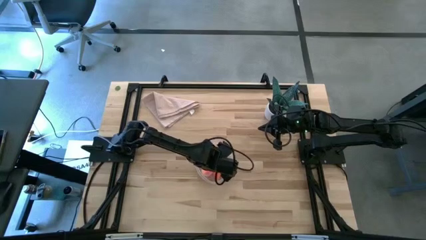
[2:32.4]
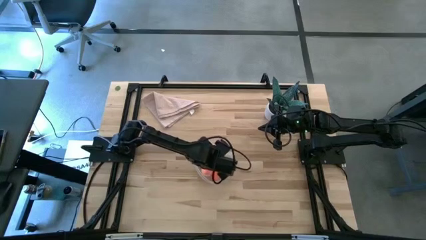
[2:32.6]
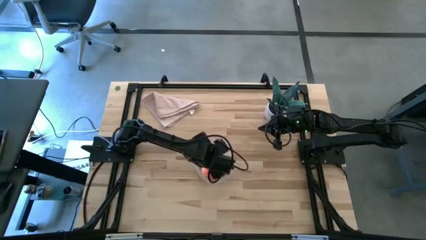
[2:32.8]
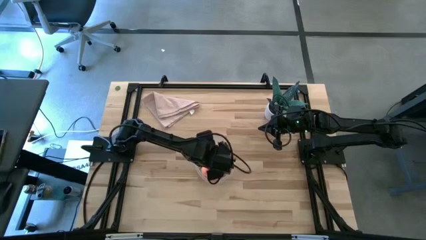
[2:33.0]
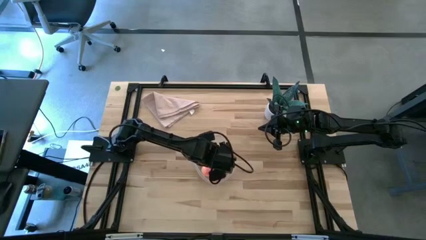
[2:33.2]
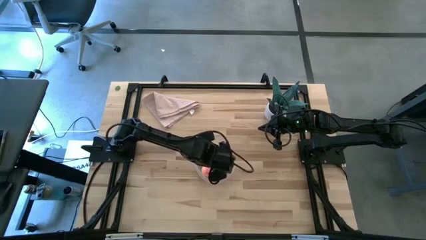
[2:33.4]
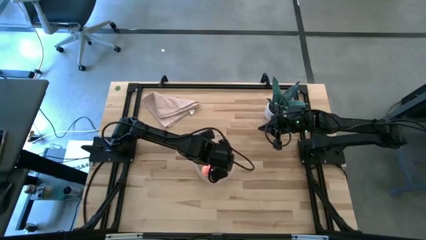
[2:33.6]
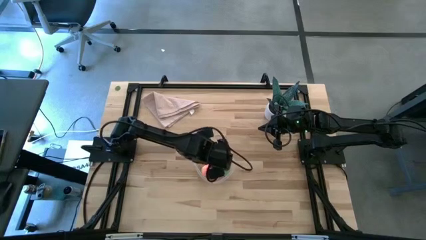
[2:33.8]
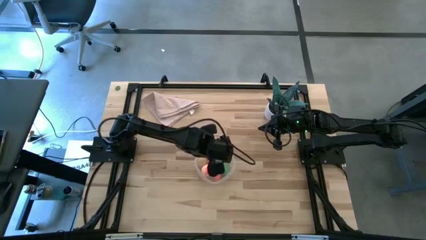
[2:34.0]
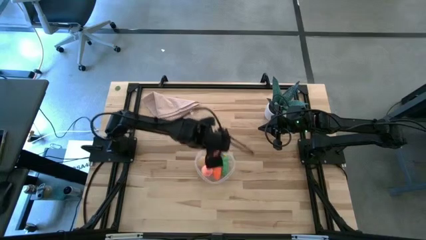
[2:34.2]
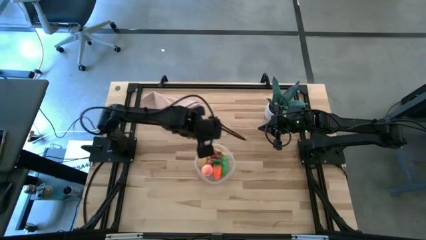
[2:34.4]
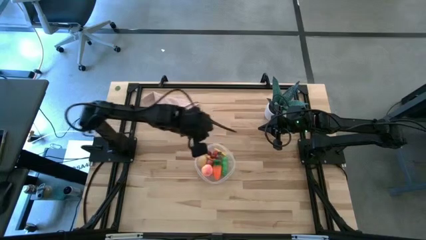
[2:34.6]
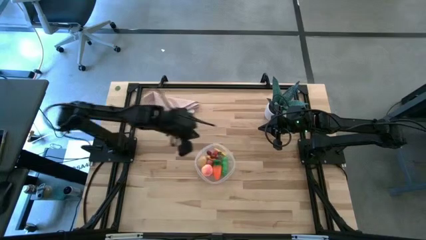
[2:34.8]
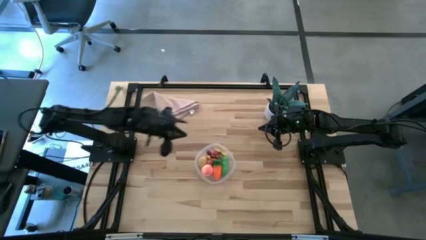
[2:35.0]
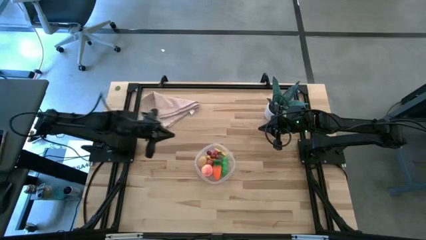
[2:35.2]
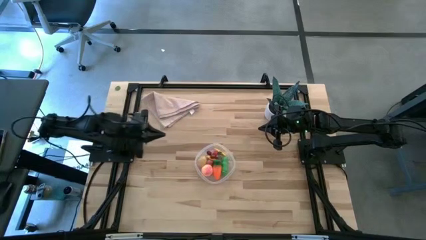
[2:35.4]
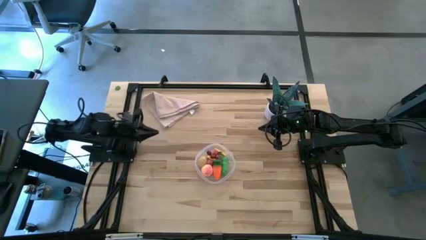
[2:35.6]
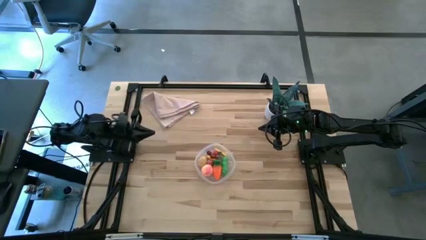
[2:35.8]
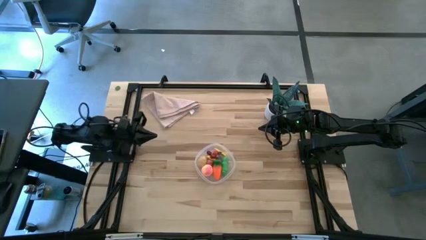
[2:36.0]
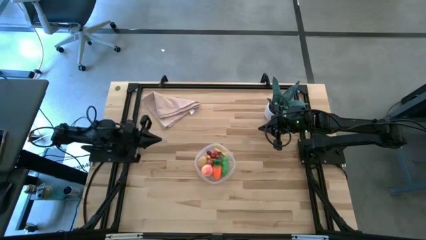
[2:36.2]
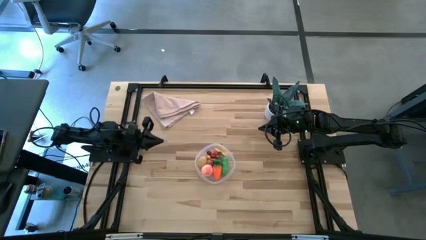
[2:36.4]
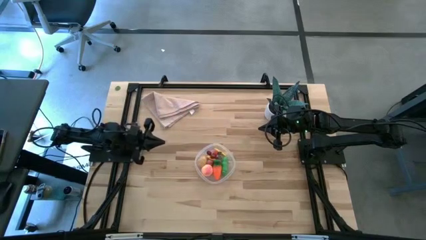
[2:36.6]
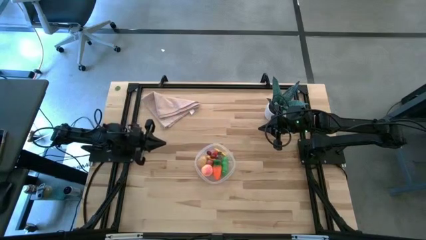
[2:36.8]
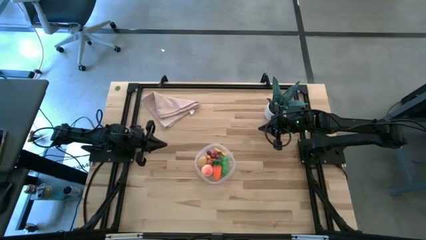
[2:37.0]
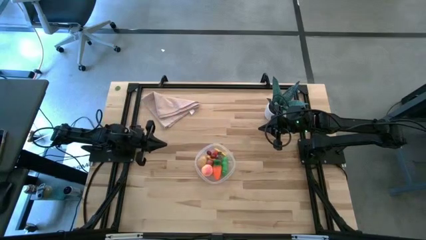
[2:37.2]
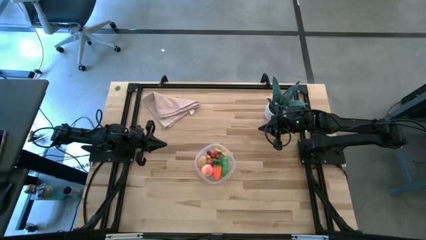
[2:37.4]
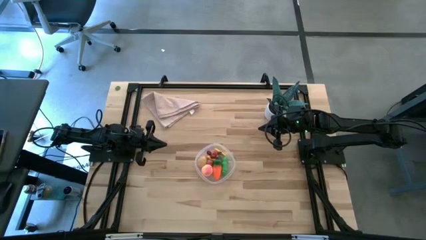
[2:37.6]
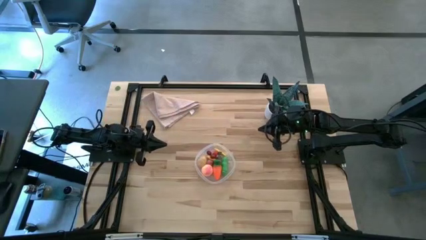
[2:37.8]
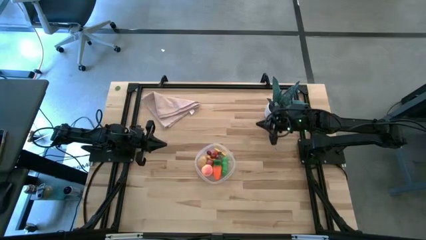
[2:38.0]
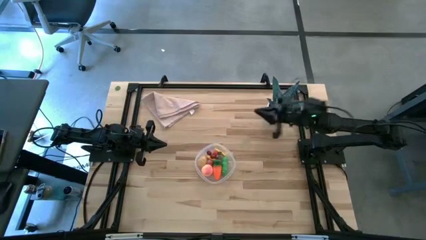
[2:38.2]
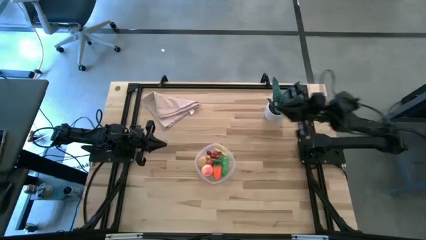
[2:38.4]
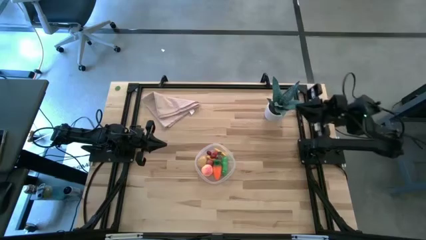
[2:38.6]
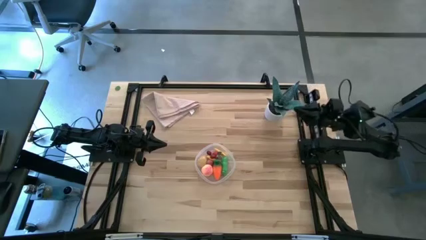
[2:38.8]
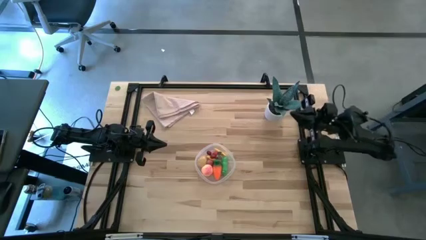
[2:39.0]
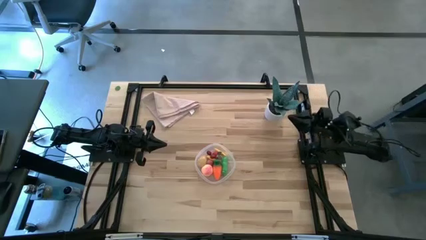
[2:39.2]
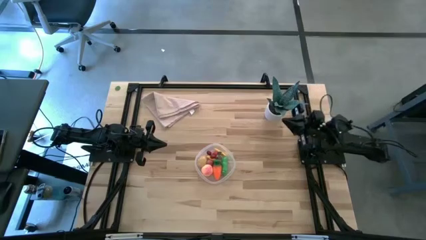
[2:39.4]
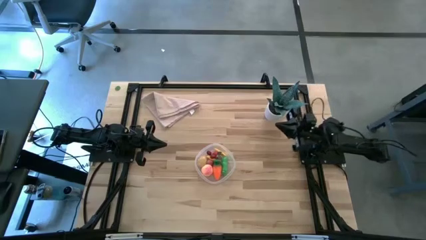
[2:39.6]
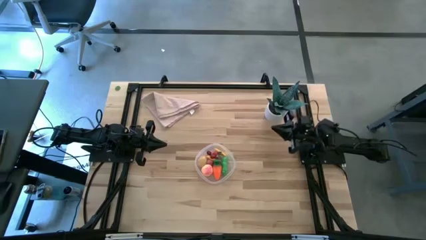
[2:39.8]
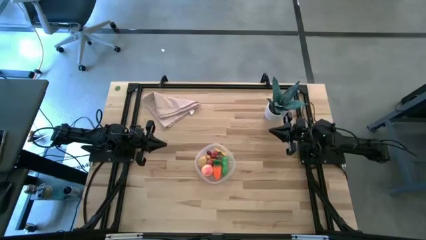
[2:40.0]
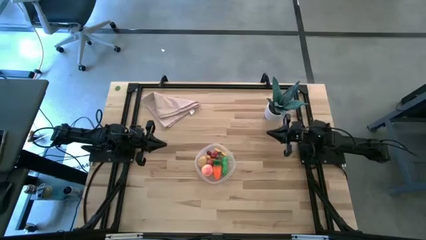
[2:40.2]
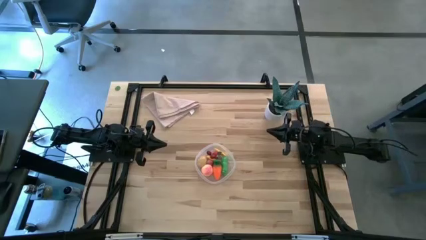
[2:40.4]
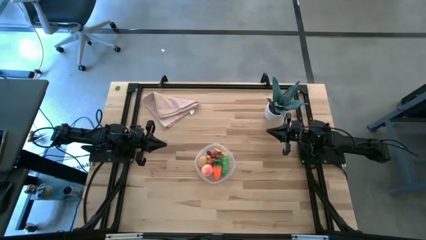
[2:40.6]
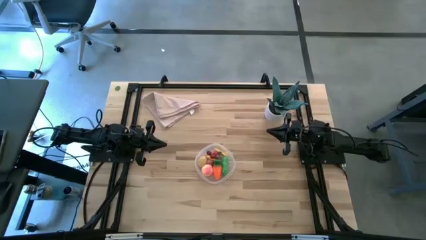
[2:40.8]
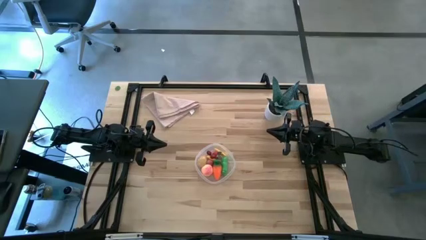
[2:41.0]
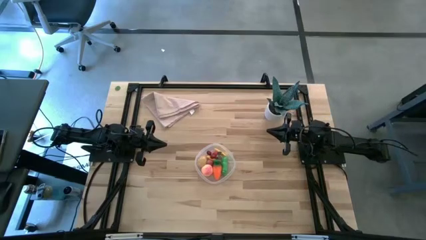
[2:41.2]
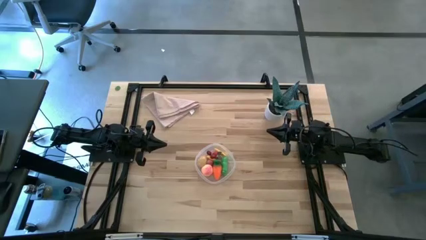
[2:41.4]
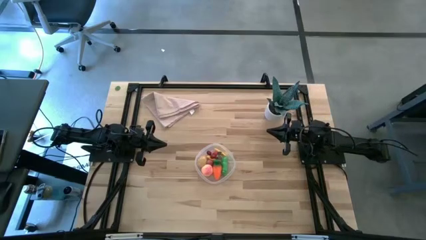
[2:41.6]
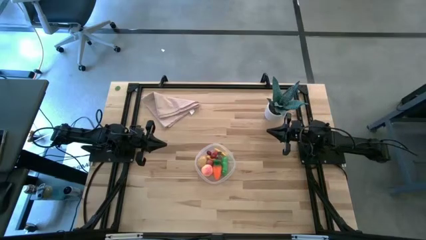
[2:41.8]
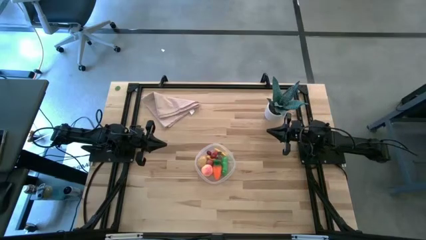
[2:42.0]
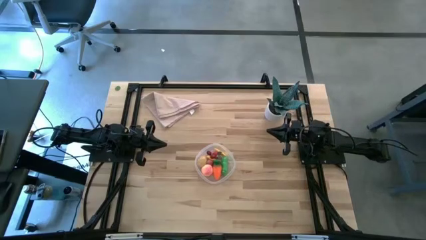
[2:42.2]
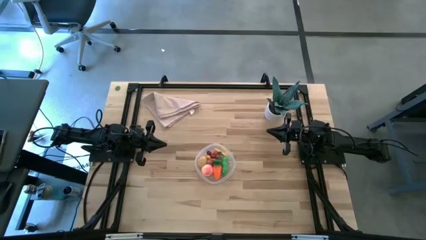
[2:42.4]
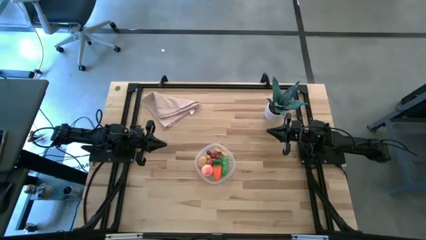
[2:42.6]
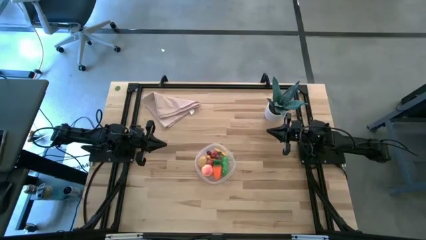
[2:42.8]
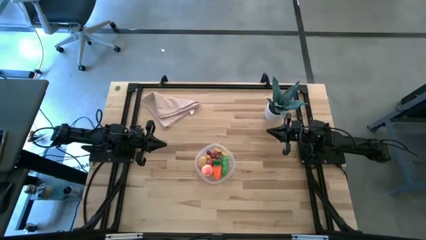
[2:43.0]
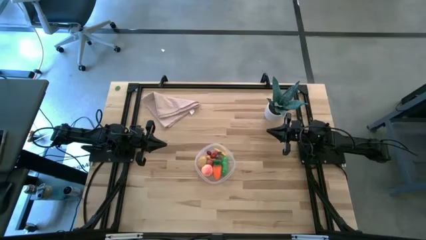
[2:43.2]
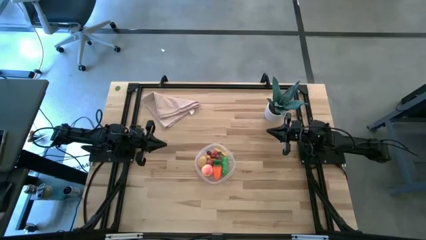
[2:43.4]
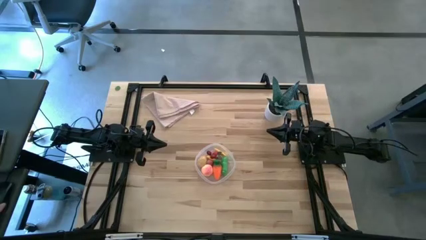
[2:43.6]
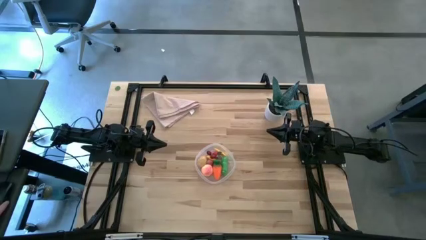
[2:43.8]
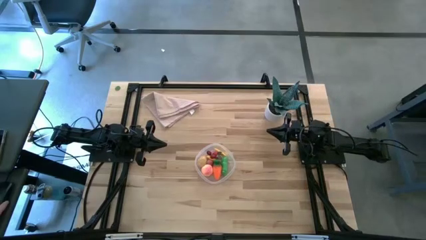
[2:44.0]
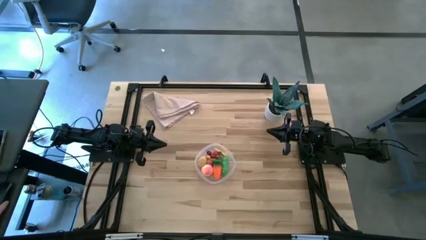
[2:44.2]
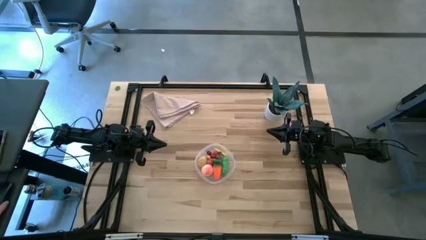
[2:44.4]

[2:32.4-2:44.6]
Task: Pick and placing Produce into tupperware
Return to Home Position

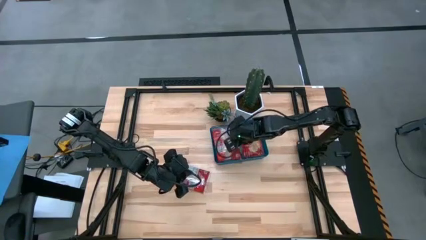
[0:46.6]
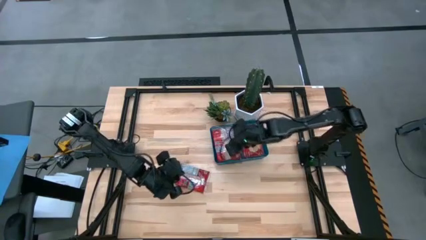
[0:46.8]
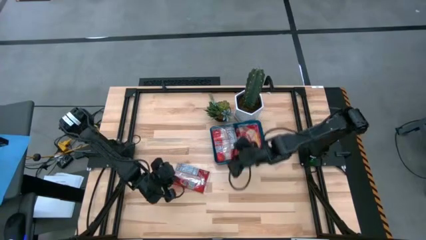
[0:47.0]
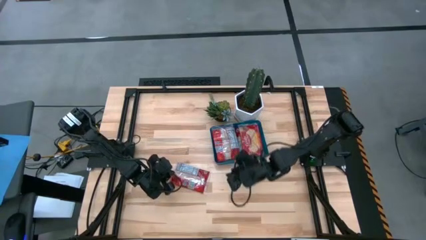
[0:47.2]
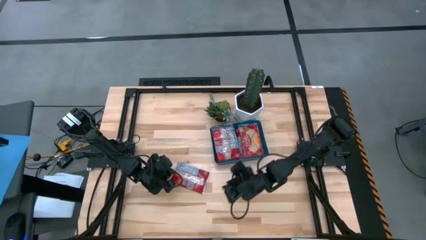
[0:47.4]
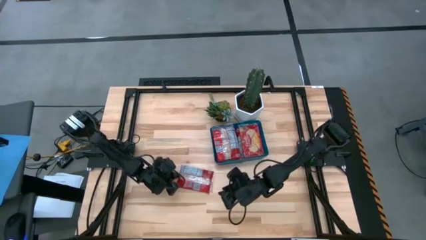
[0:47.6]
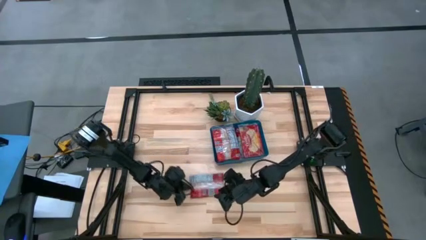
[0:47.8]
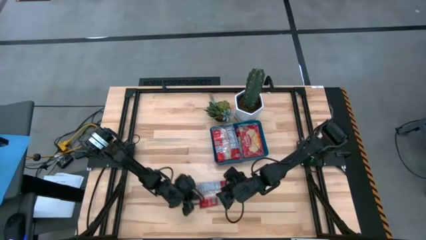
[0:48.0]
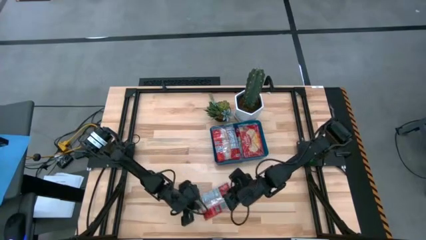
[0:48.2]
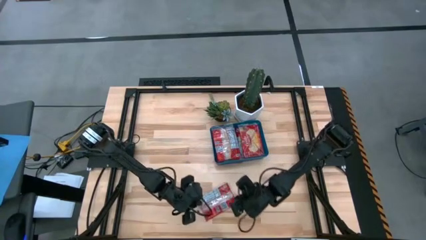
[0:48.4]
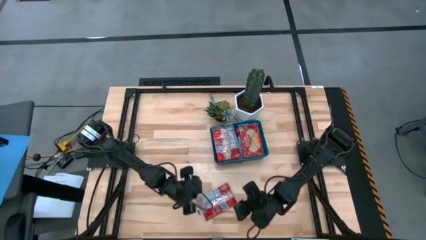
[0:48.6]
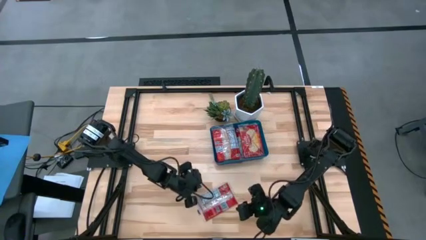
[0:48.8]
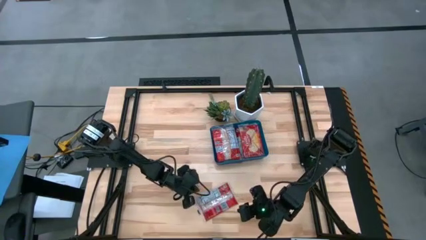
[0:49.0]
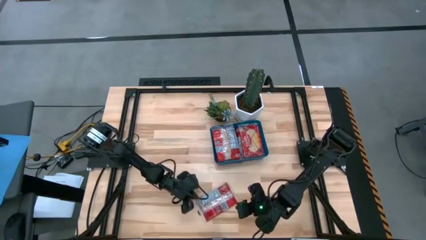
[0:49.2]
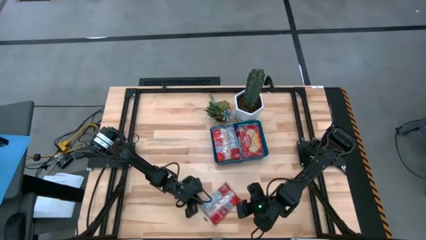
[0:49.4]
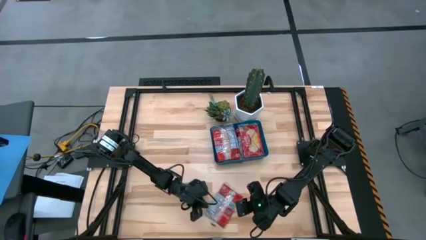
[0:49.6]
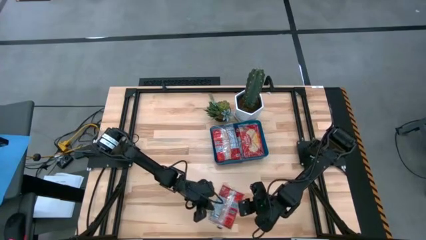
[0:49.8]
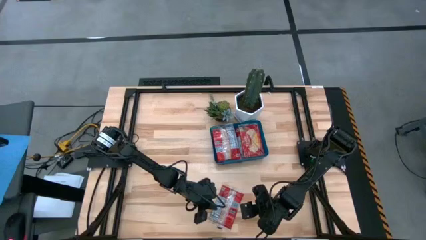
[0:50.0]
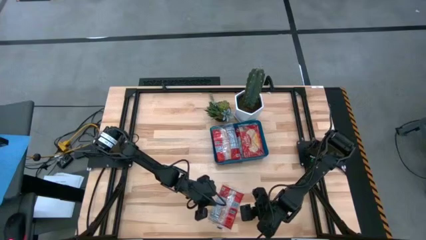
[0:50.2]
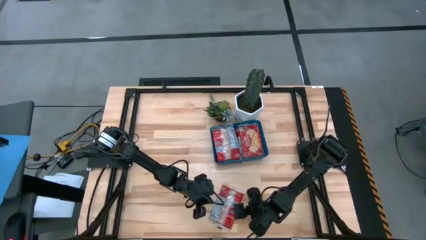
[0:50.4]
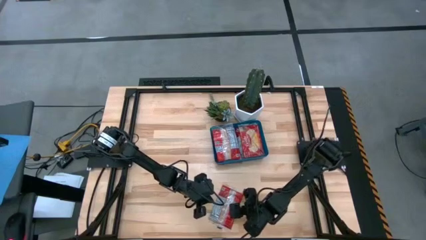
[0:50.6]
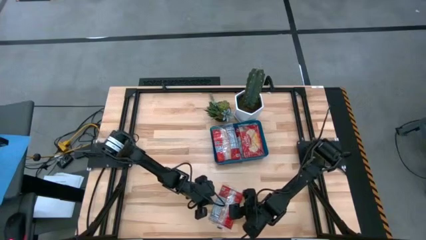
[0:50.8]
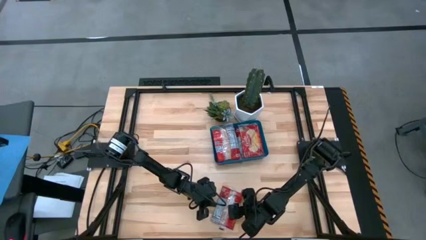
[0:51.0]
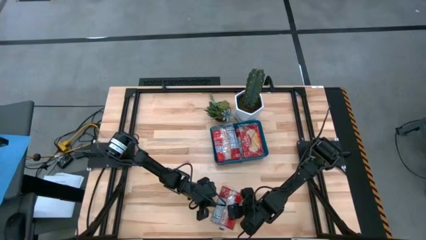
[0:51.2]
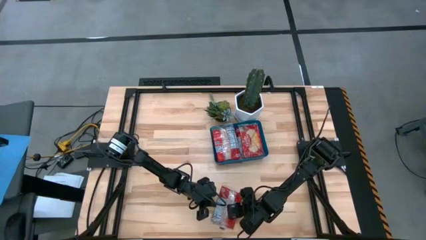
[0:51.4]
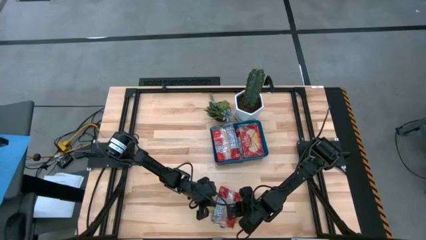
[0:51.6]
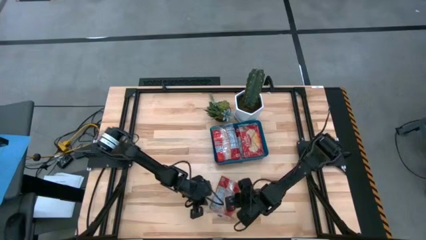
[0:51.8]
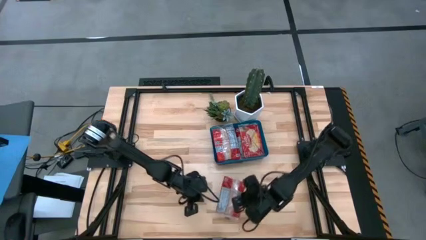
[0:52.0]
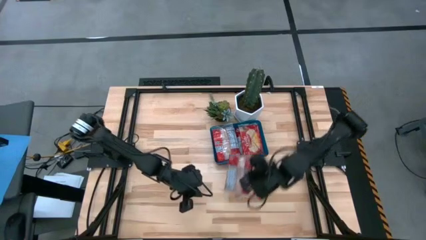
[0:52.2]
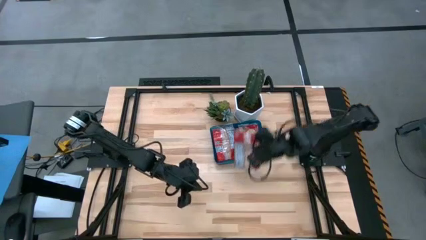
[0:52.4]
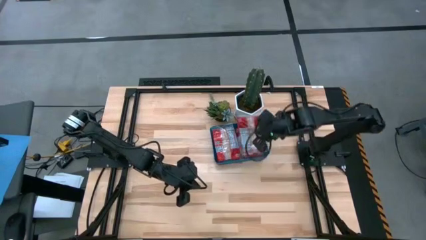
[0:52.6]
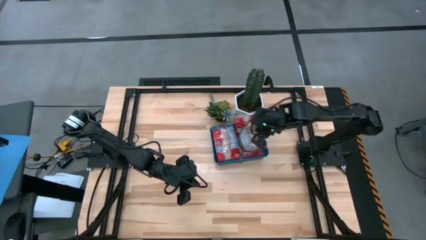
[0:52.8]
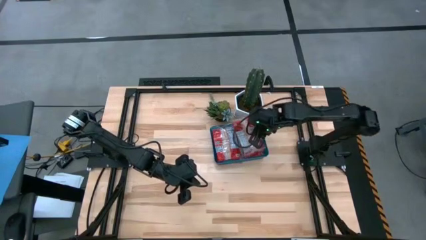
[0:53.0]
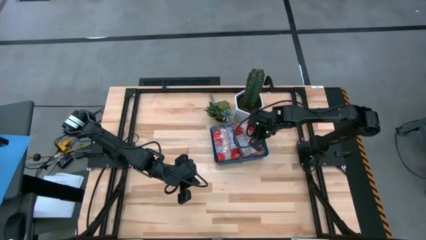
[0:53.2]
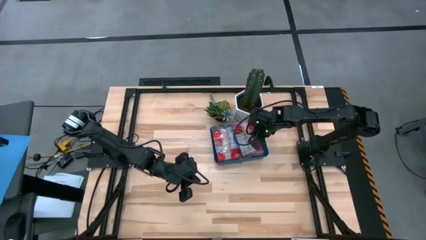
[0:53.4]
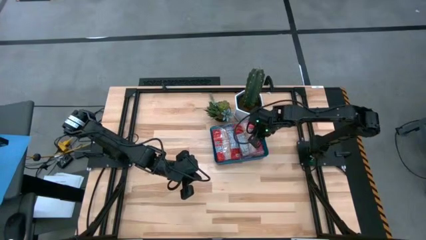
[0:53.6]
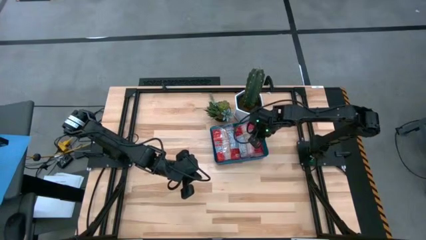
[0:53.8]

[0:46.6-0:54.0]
Task: Sort popcorn bags into baskets
Put the red popcorn bag into the blue container
